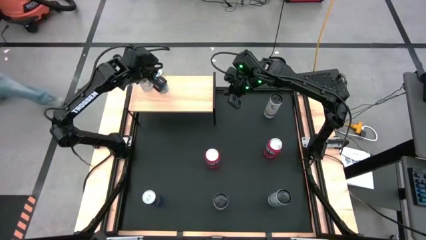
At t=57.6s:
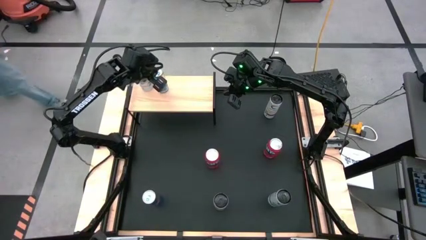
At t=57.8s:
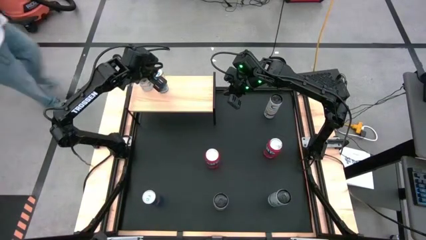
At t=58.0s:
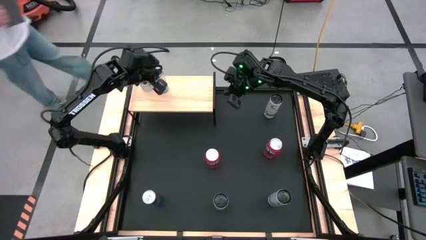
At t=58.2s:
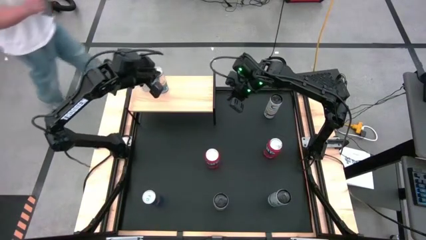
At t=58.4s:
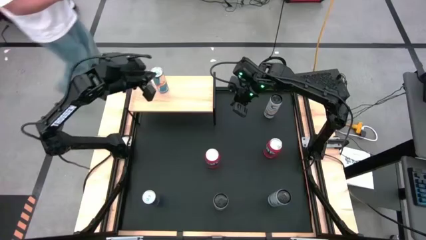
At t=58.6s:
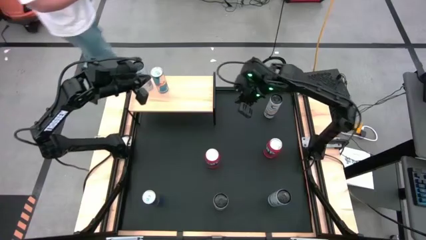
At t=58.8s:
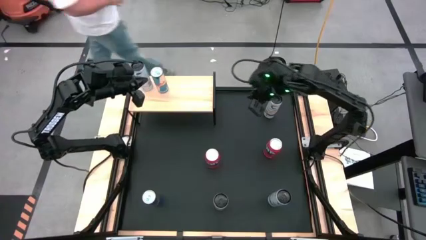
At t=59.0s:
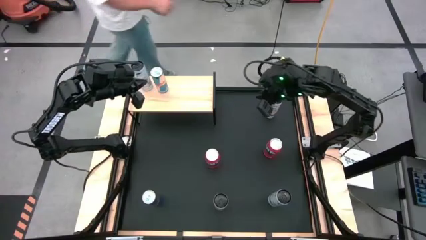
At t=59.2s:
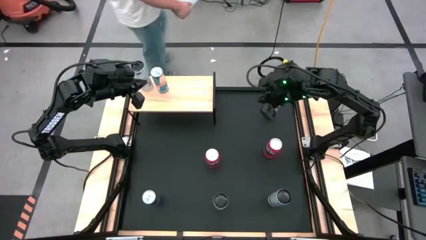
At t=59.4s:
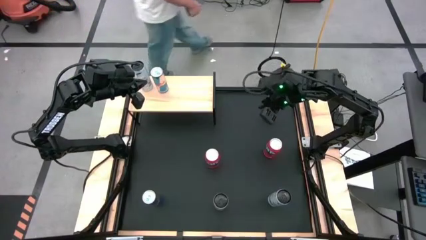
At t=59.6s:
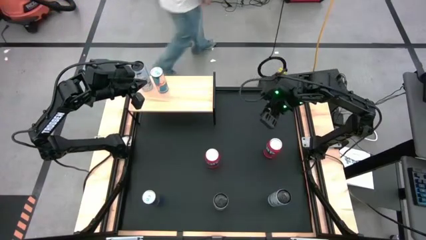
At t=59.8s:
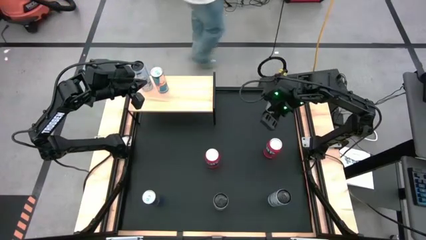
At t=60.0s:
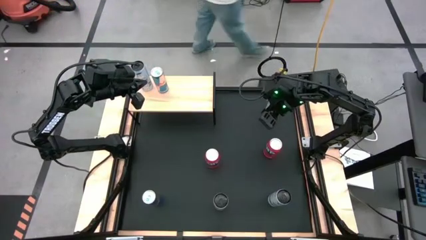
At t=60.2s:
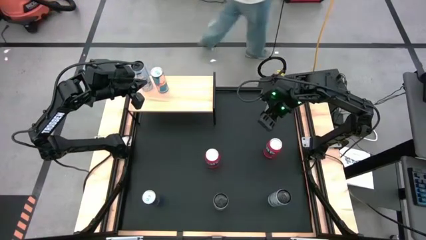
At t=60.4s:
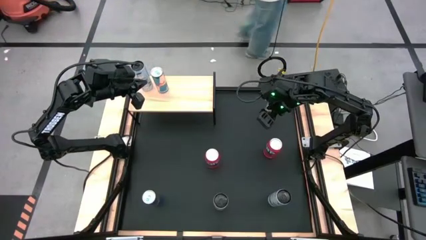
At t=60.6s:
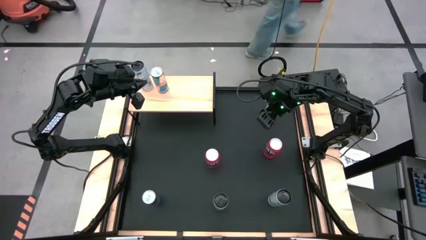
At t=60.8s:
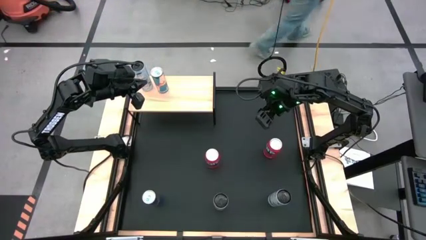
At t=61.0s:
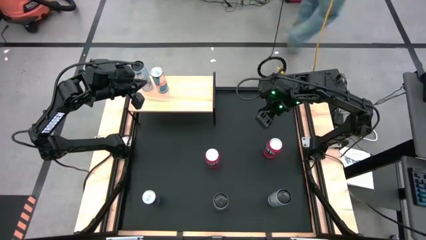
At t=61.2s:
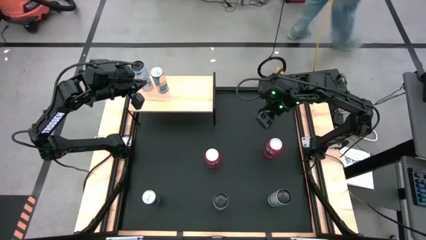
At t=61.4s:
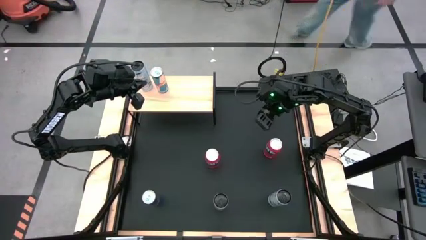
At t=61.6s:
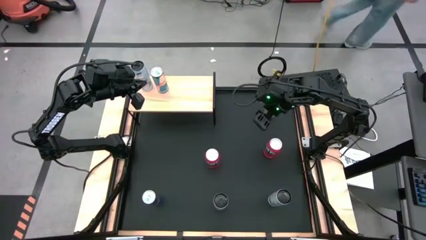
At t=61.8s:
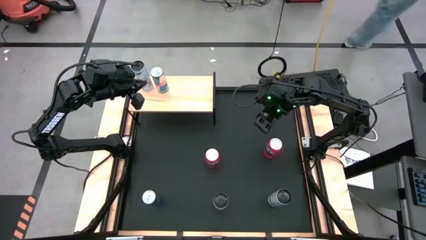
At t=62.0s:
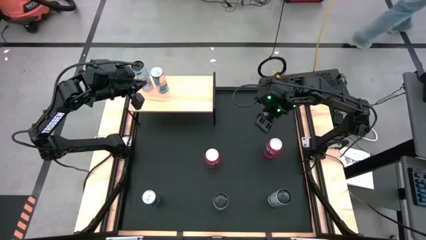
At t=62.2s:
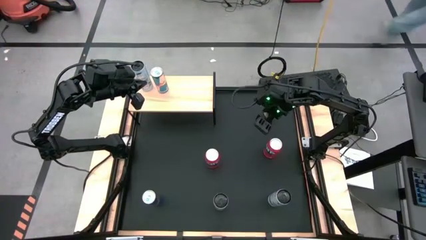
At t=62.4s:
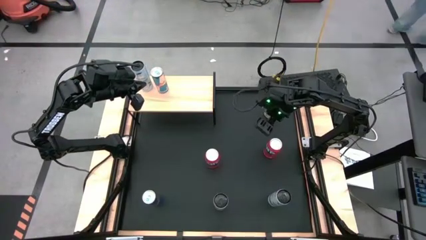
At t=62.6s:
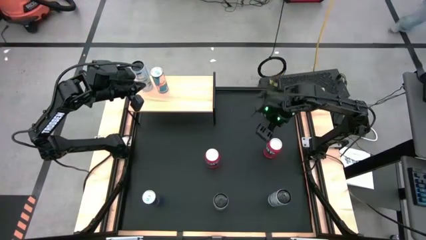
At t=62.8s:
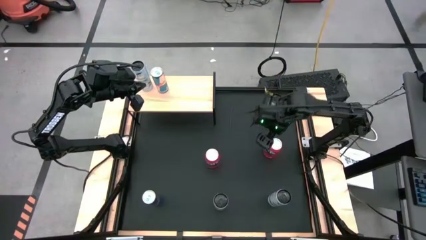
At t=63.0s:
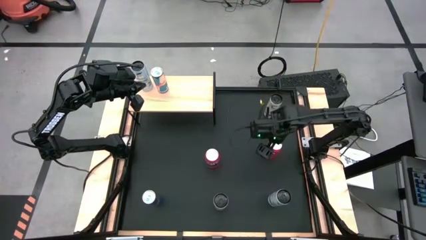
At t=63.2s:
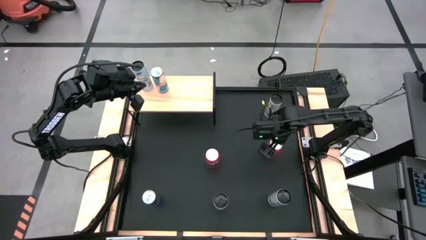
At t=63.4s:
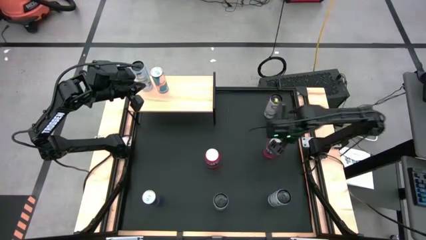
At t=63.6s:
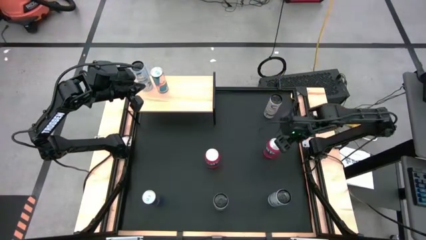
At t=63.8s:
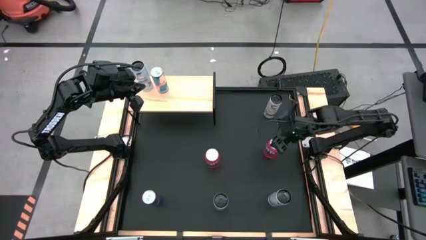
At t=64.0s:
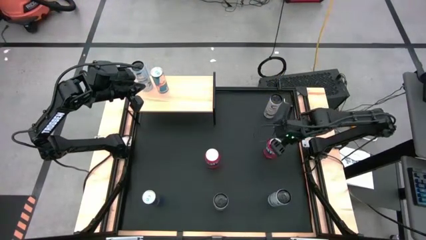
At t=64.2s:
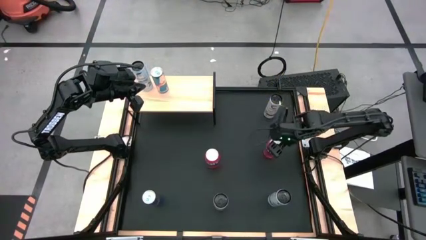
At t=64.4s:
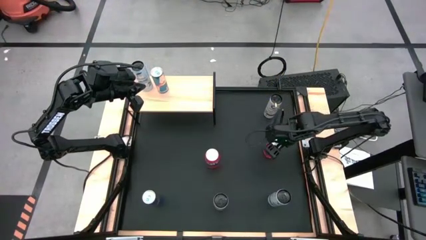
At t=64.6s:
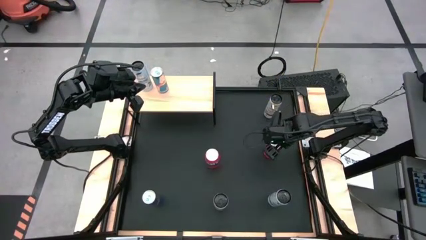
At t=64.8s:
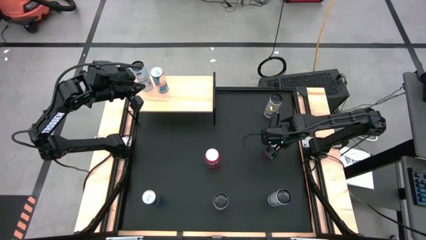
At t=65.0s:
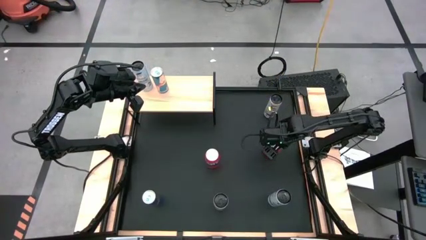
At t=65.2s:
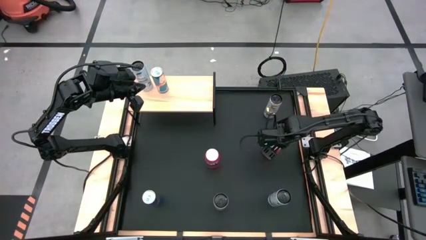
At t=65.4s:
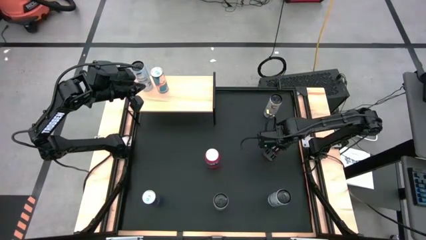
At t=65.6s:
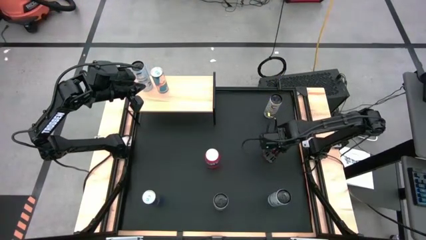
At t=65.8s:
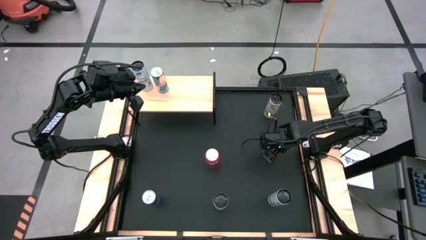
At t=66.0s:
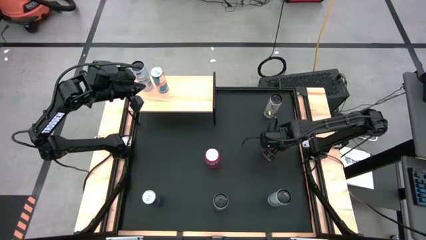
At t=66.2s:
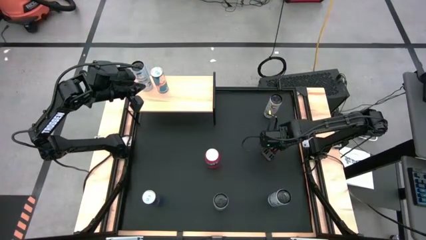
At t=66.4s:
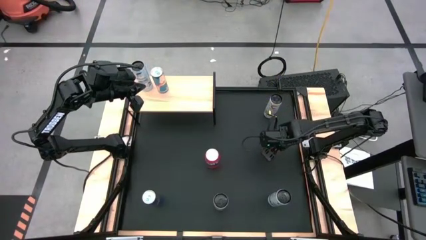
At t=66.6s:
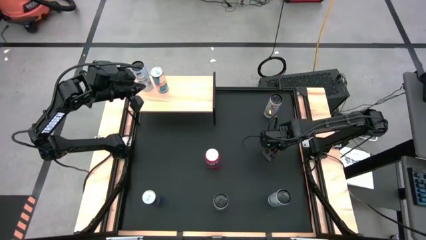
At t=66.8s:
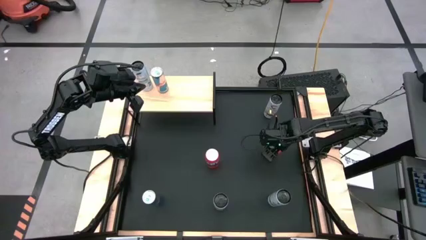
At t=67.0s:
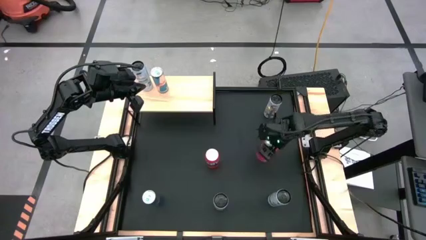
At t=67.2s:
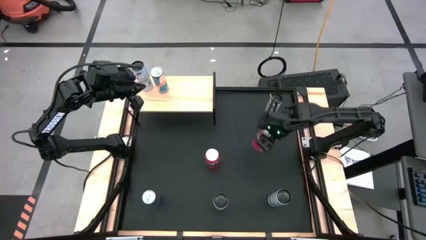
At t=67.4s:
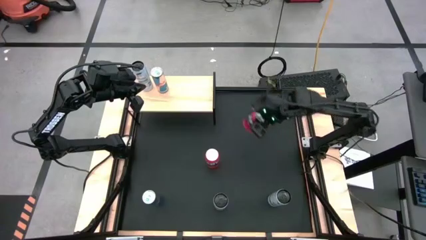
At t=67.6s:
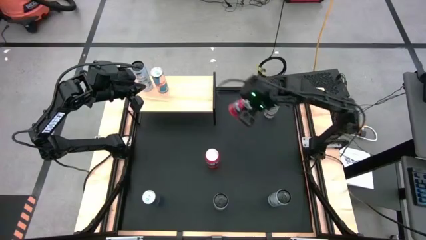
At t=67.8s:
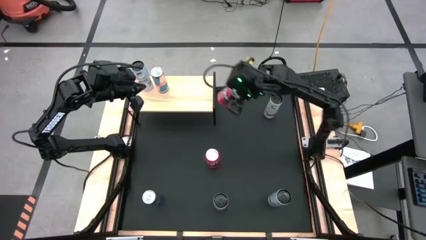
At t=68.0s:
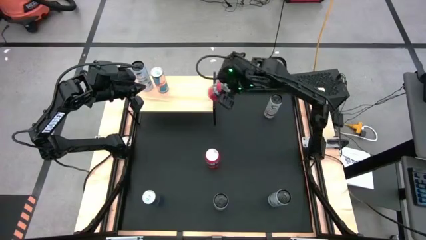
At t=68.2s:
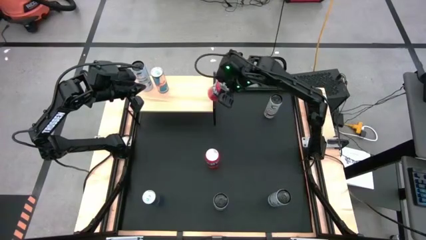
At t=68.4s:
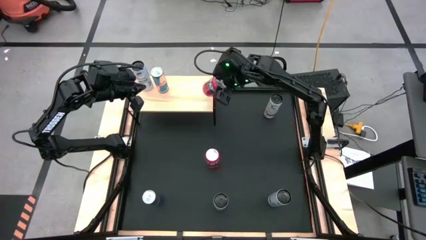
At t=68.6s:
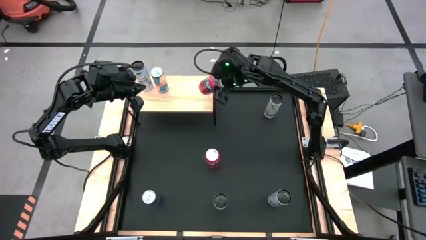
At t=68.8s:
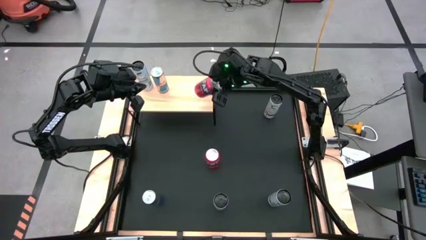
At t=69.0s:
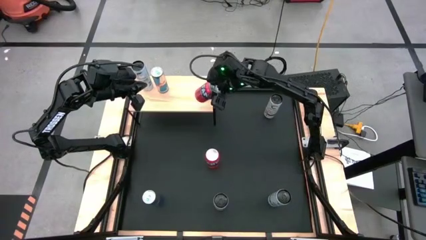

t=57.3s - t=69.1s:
Task: Place canned beverage on shelf
Put the right red soda can on the shelf

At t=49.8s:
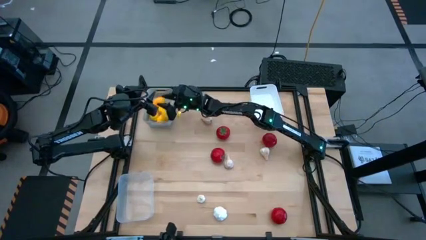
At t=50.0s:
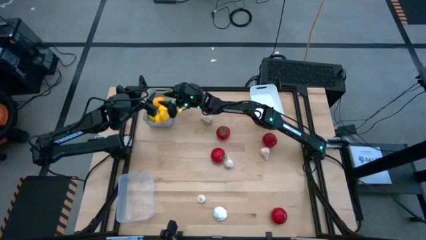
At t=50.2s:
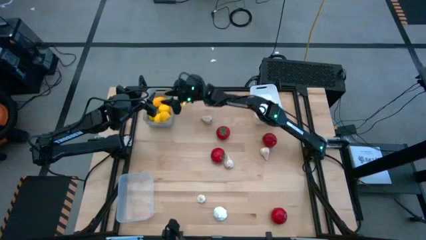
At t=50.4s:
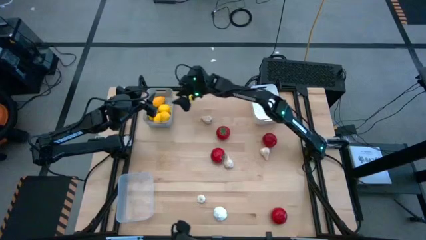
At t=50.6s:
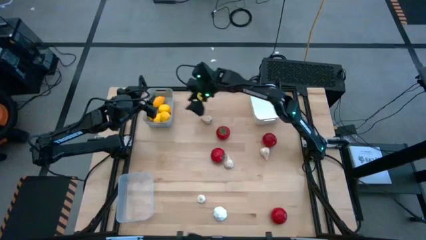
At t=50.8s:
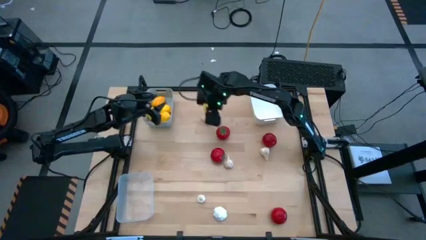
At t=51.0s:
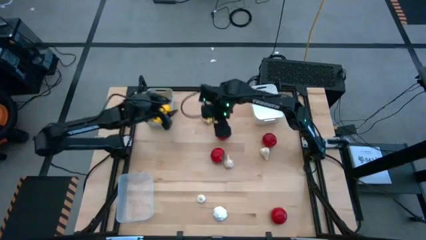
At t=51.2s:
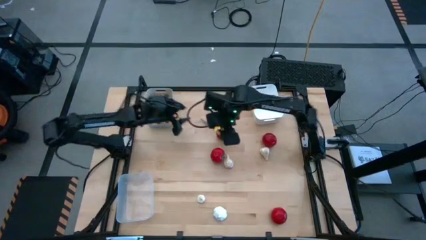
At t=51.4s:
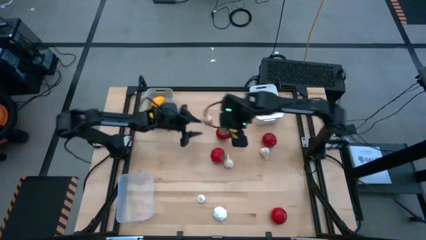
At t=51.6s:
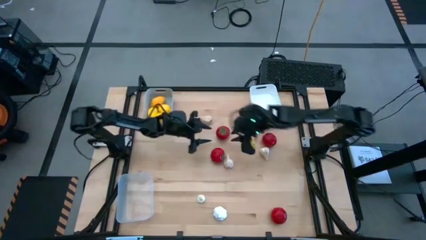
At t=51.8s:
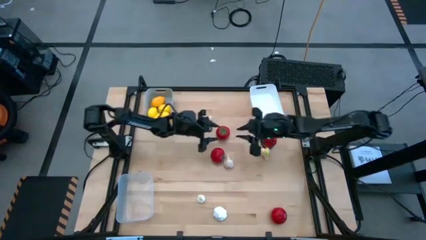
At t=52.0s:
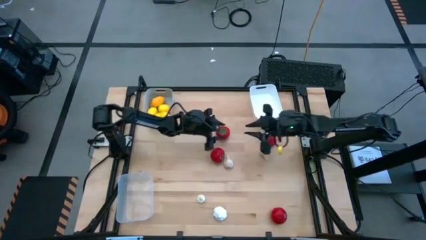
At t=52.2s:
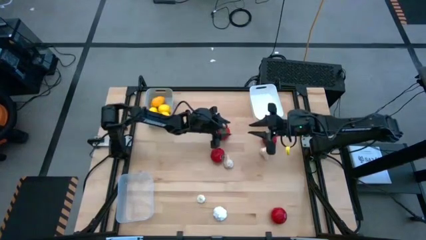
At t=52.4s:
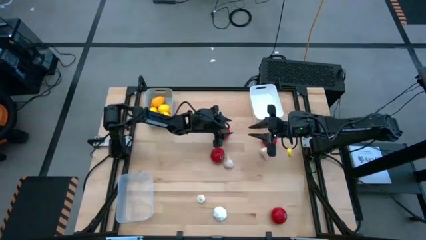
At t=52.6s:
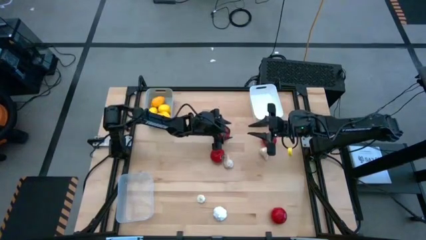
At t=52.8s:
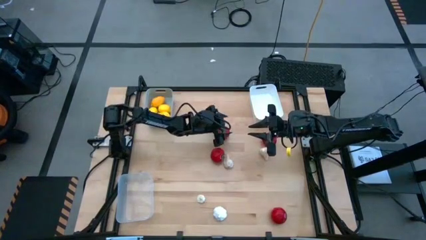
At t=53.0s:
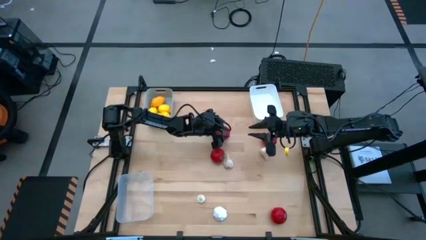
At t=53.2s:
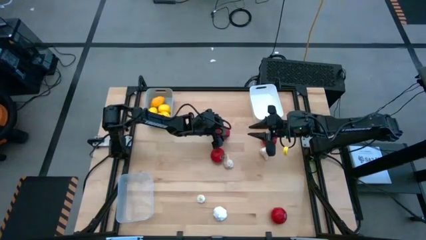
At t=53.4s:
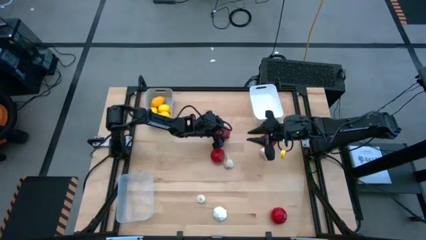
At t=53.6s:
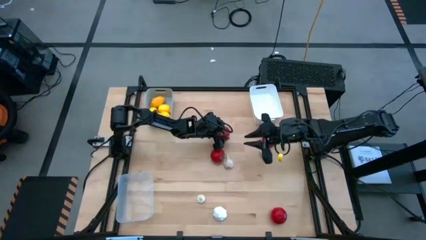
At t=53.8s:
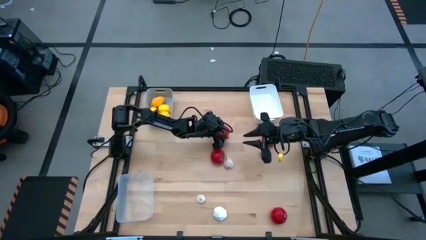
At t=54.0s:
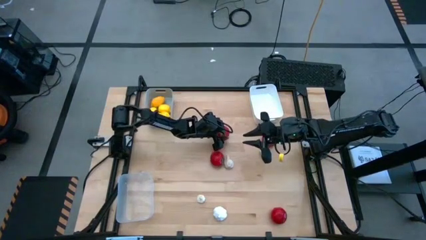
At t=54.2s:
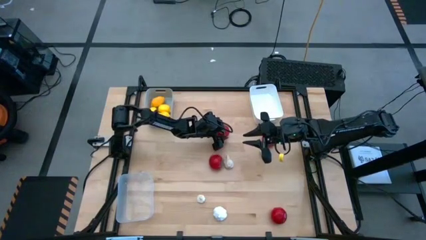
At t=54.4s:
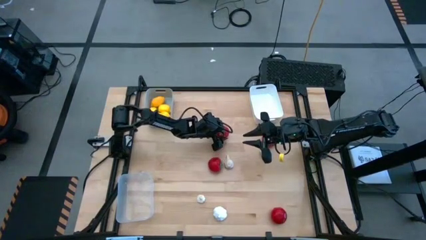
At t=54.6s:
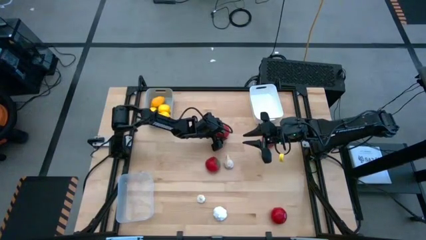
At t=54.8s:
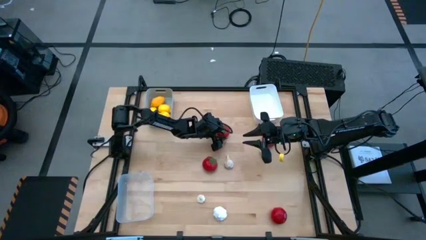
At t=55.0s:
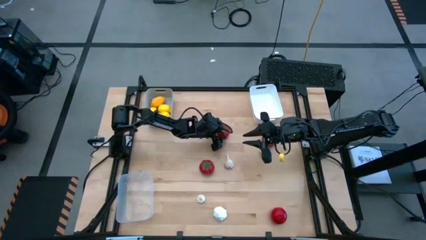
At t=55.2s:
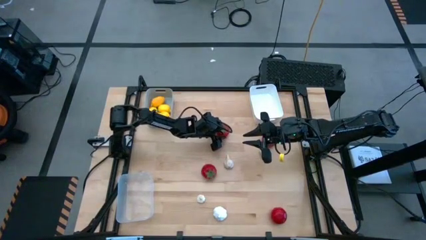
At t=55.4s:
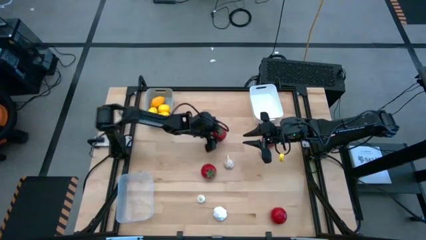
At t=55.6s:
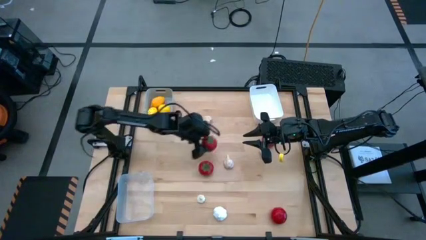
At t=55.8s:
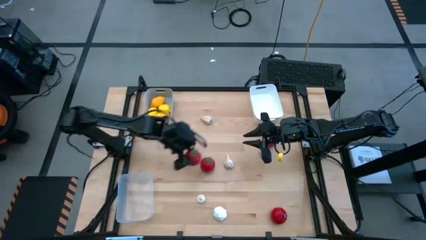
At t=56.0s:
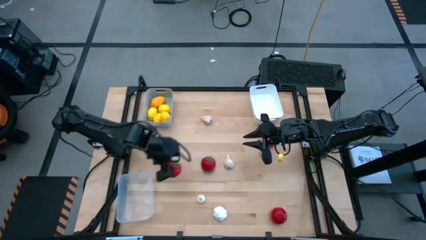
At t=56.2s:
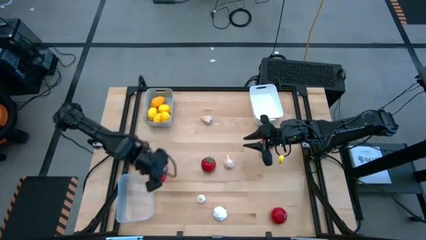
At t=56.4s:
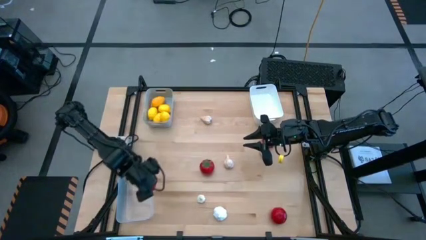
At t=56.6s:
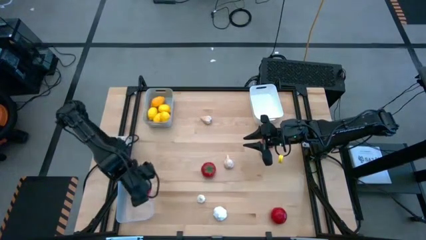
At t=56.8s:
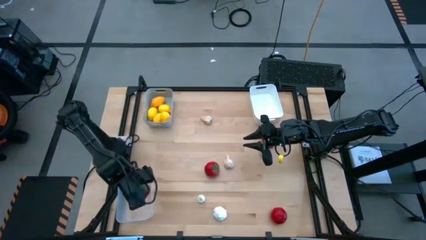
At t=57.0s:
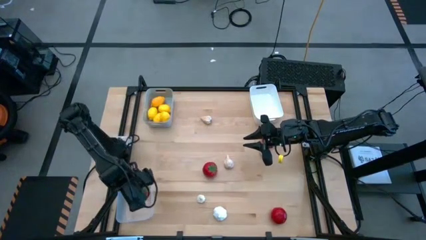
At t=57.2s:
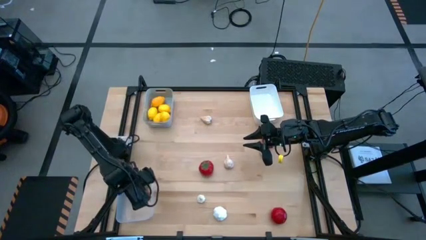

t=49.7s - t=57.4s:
Task: Sort produce into baskets
Put the red tomato into the transparent bin
